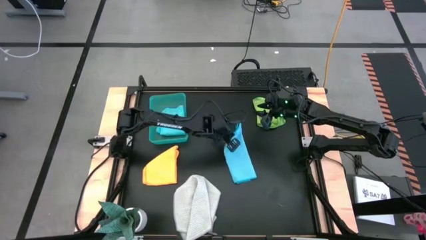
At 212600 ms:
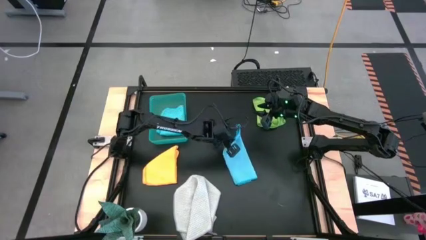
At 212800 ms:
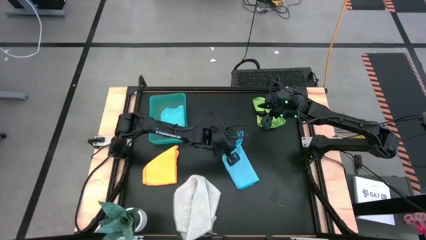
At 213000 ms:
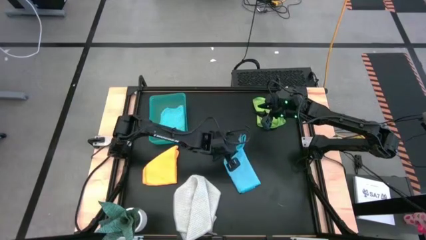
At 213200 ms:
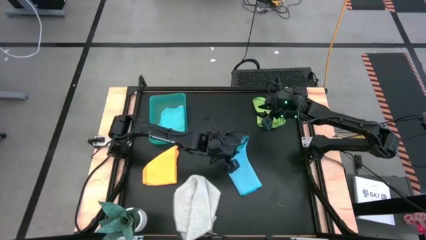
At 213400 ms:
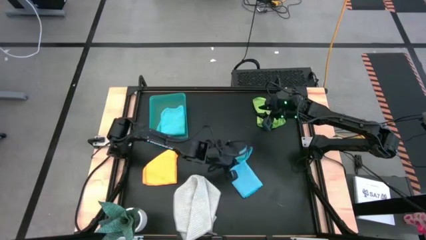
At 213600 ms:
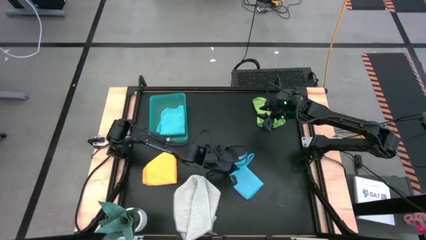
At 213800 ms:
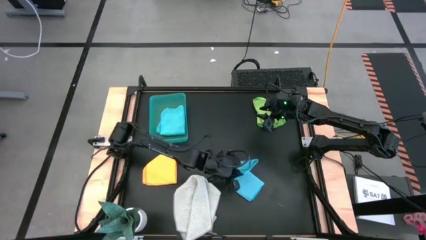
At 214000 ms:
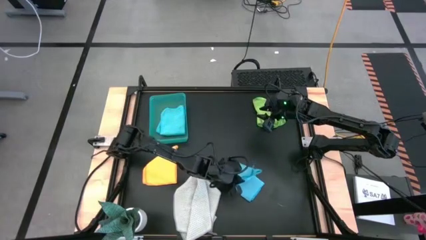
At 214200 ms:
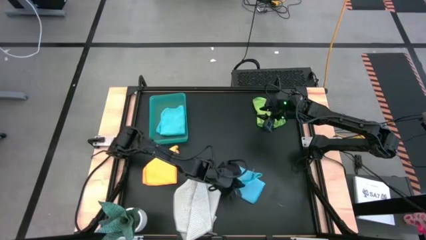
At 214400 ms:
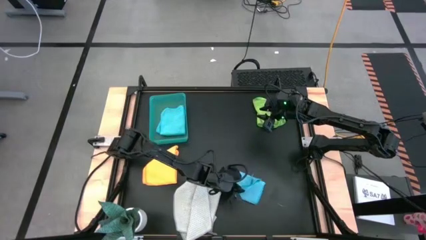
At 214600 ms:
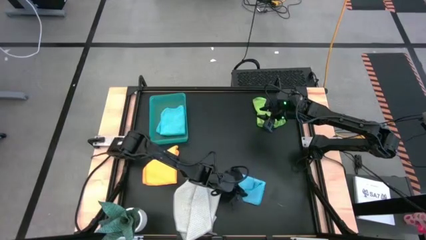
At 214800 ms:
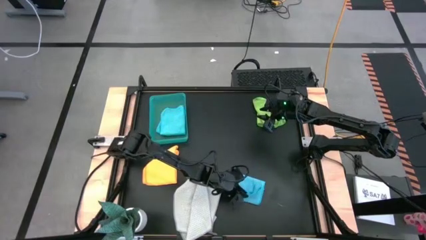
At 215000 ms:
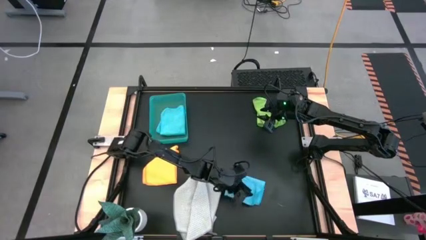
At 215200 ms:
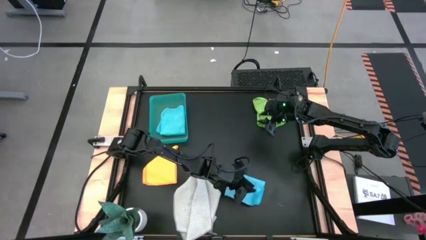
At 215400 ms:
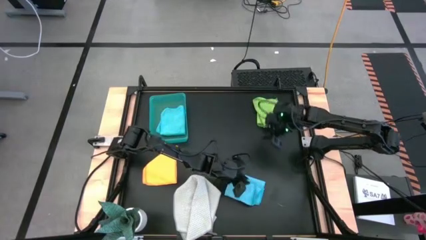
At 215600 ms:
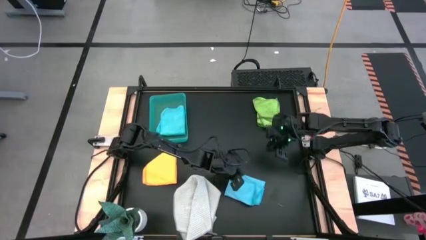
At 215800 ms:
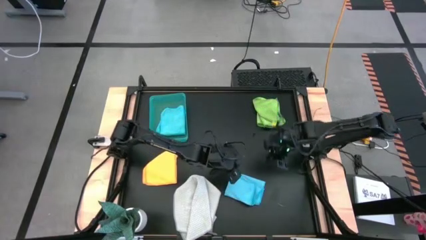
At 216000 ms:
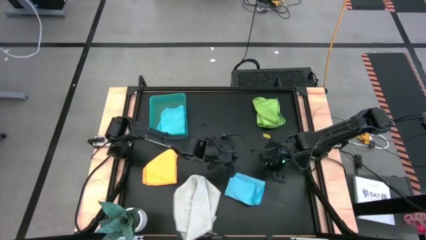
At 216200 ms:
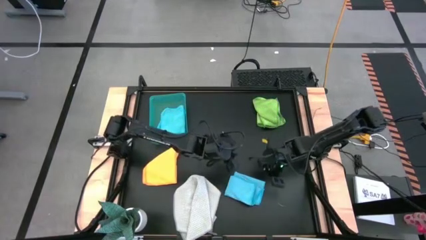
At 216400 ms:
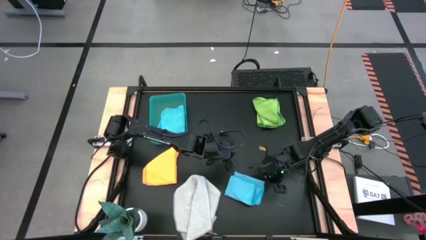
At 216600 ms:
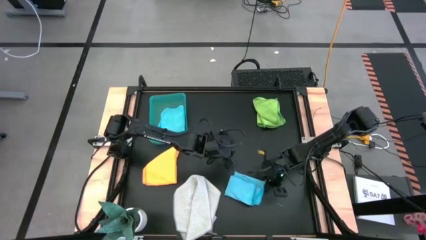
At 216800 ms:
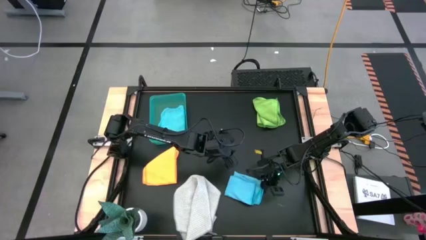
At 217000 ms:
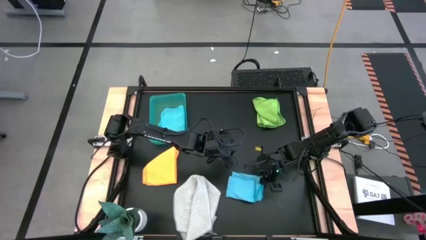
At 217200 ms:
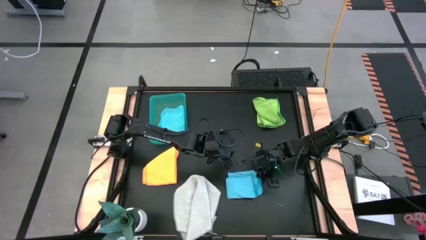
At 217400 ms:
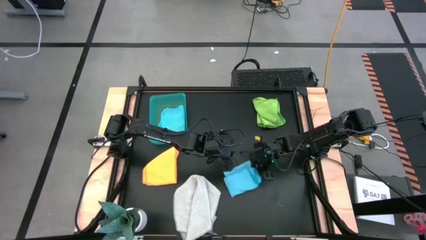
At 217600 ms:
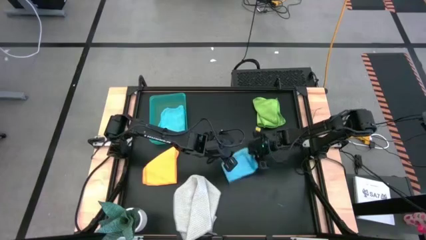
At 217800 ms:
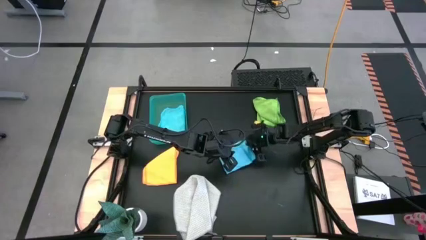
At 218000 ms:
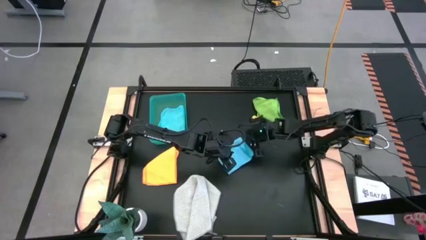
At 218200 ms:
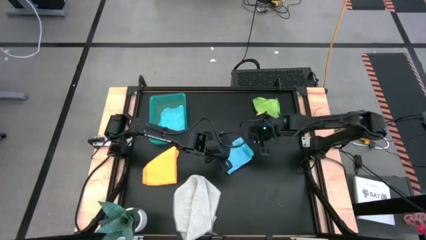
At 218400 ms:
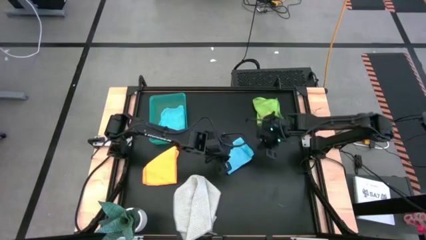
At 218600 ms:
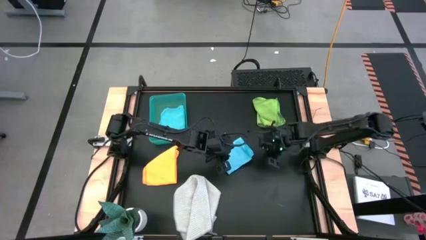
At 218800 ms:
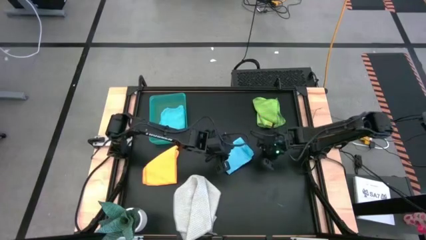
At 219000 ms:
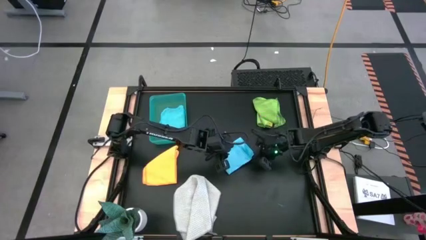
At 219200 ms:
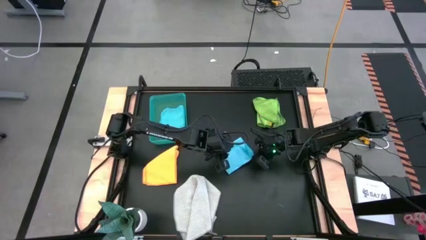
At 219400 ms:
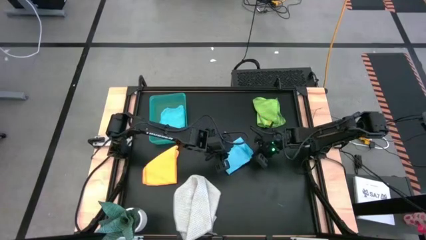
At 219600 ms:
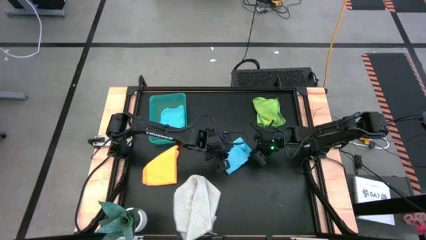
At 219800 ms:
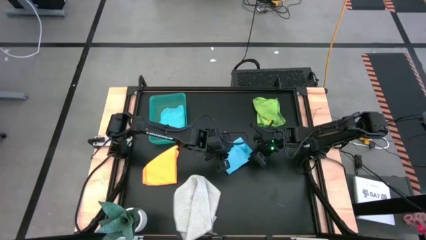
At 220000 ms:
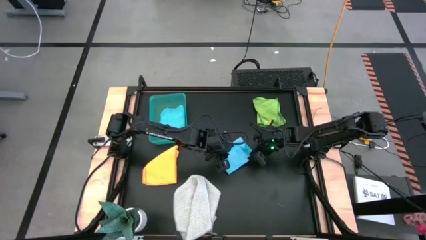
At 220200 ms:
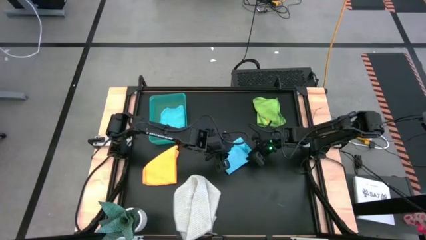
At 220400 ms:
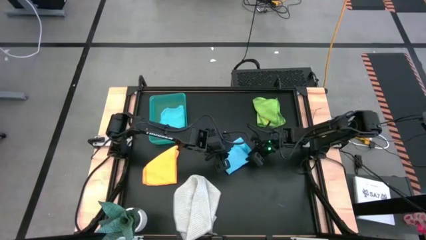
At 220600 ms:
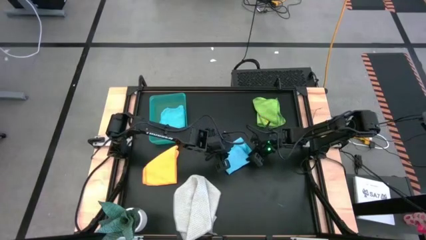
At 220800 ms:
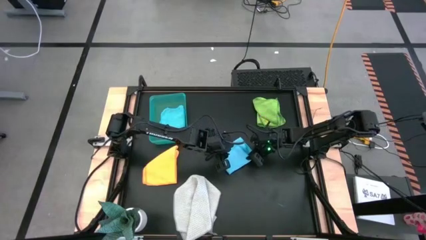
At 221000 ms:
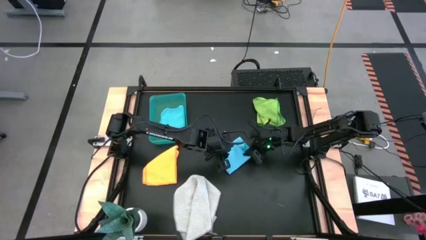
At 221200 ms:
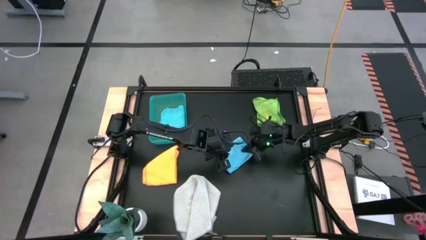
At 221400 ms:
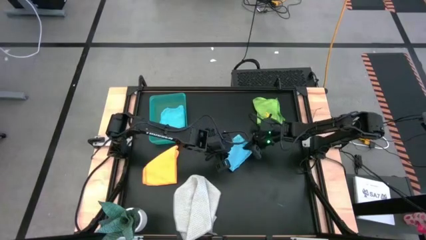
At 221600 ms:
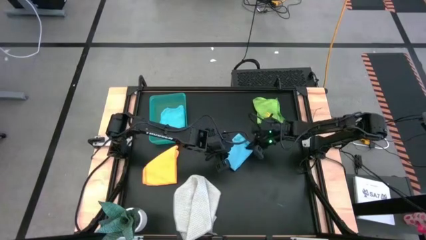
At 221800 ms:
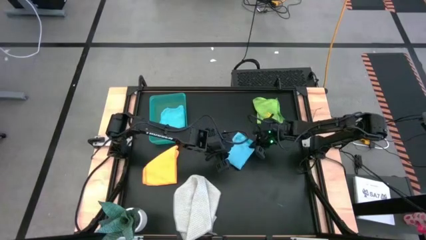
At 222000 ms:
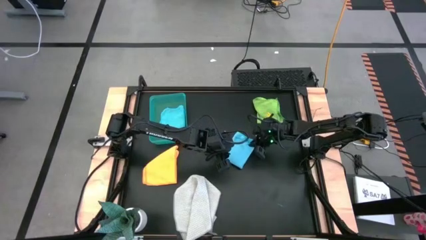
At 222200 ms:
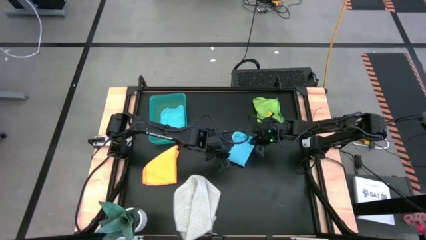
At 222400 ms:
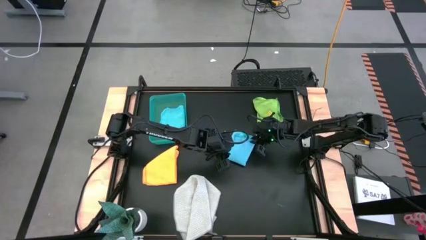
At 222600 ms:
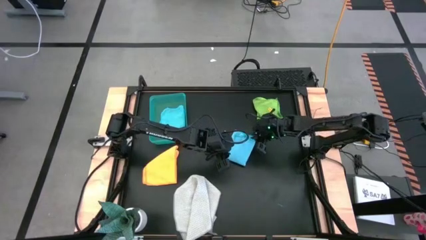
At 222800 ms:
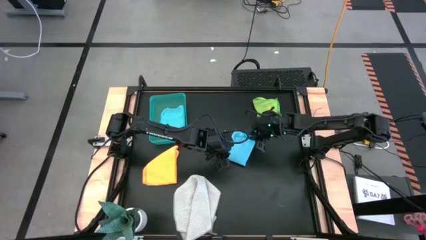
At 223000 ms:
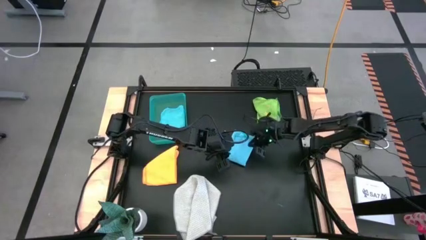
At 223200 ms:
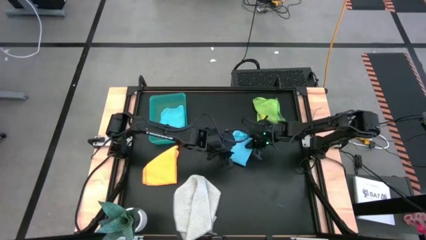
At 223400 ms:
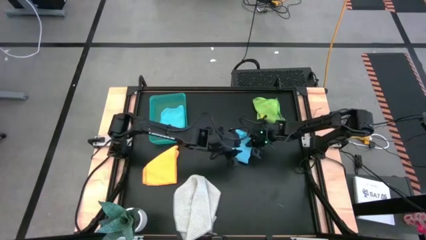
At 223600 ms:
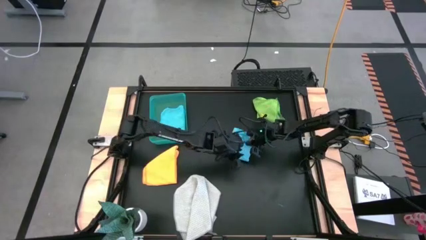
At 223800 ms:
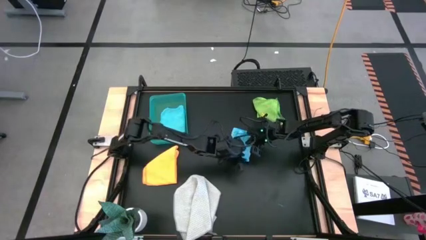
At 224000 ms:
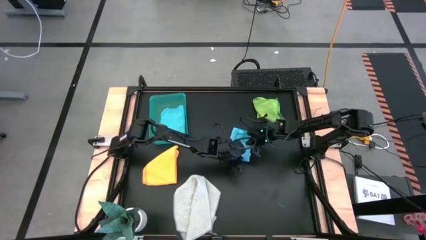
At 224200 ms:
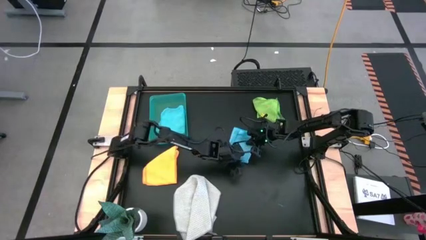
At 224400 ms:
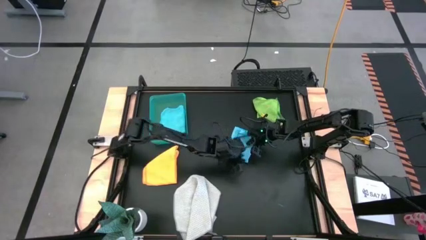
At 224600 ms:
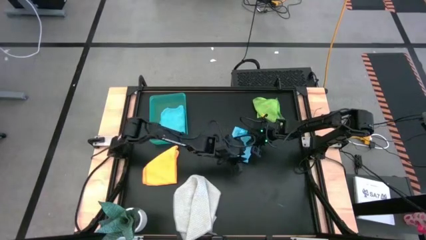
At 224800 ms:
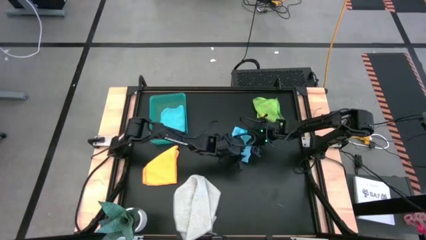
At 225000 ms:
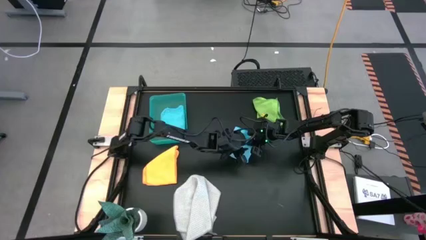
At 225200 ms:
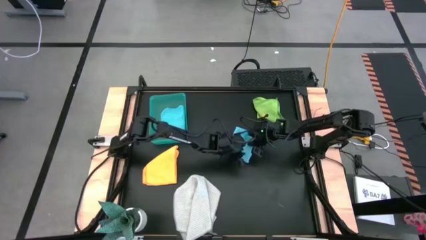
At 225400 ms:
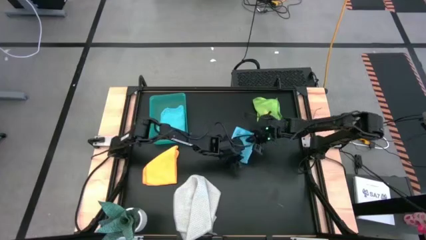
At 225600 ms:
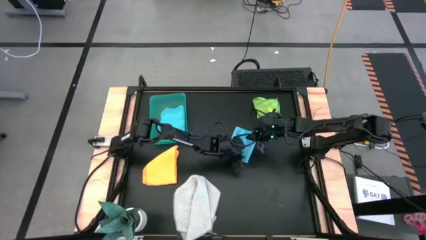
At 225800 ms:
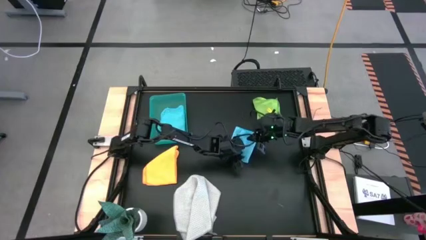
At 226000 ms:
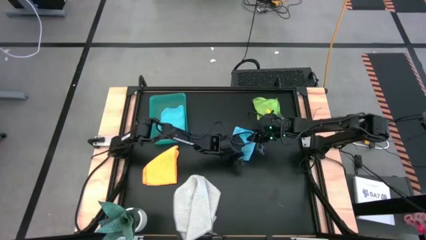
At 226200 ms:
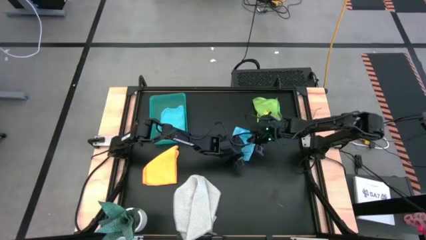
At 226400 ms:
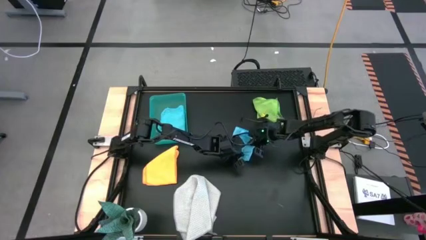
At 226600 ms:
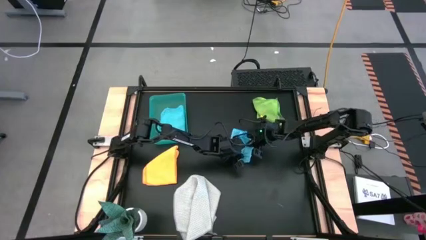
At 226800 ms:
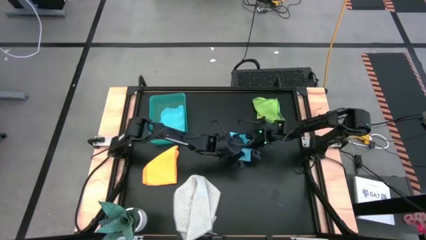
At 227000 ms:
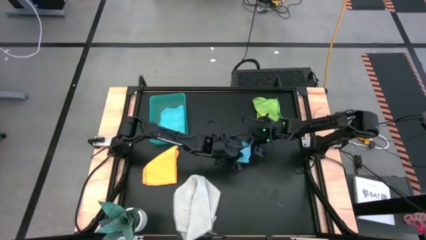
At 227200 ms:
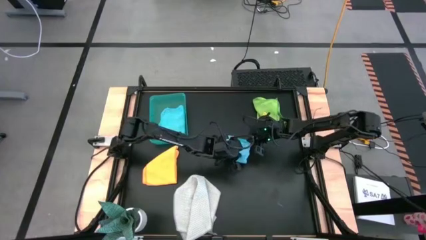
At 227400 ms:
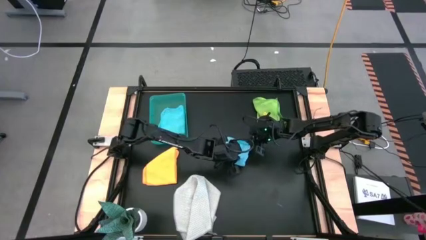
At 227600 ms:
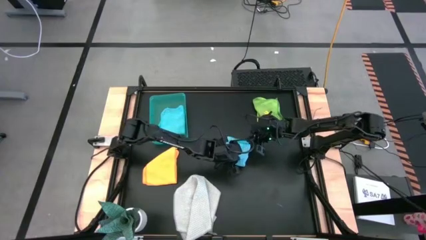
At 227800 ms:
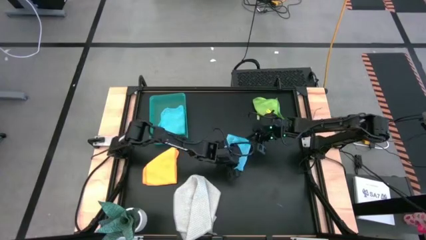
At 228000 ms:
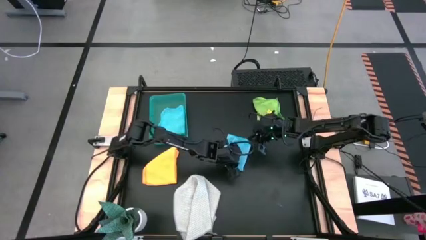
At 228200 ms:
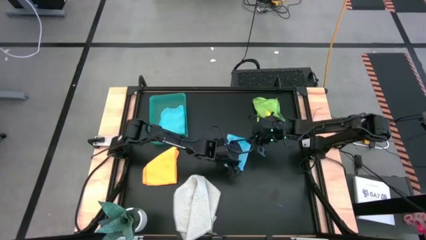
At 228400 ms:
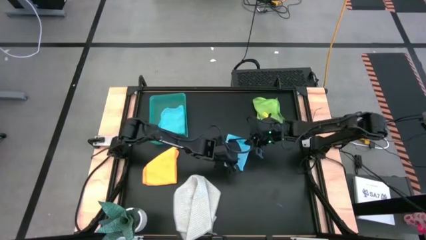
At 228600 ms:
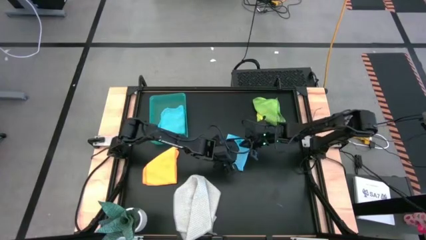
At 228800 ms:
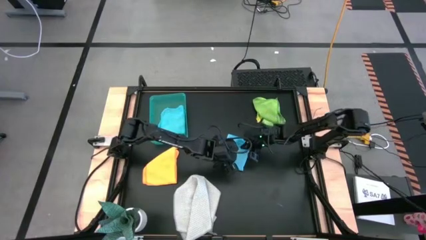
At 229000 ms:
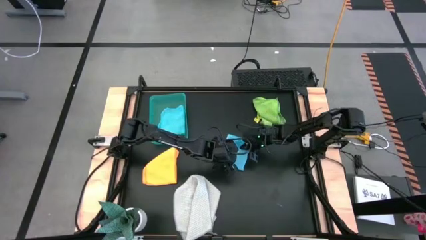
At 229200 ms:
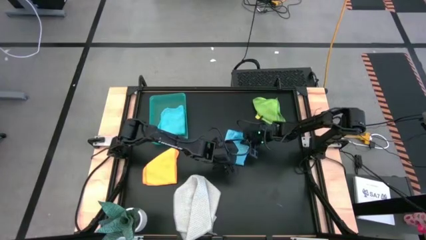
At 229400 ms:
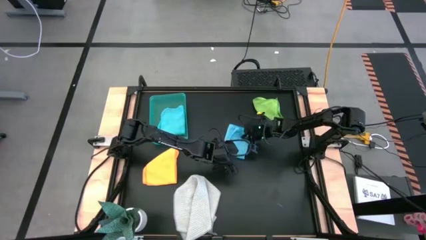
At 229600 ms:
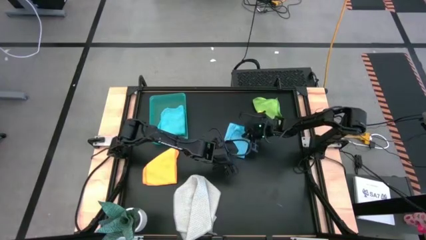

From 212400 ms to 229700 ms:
Task: Fold microfiber towels
Fold the blue microfiber towel
